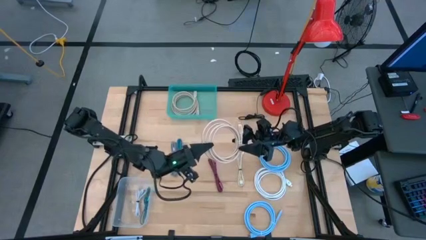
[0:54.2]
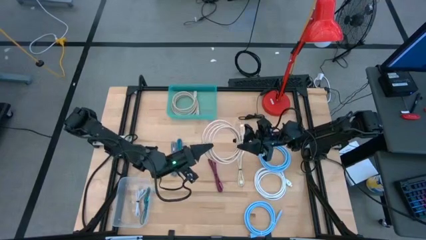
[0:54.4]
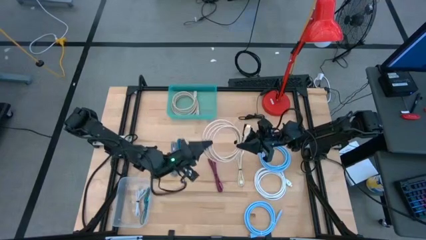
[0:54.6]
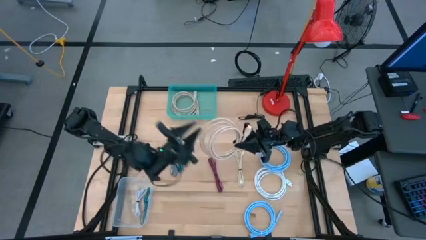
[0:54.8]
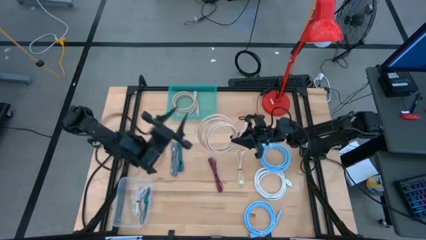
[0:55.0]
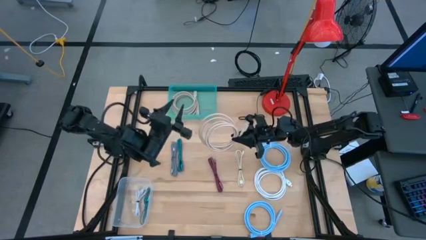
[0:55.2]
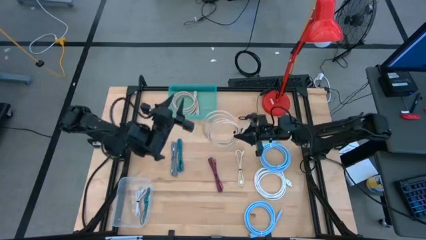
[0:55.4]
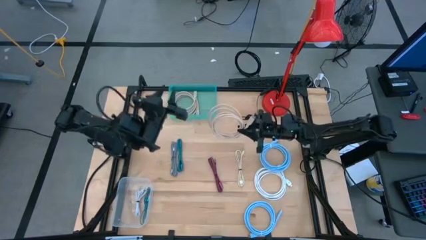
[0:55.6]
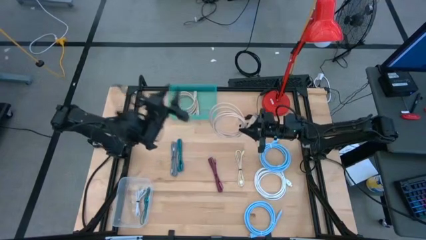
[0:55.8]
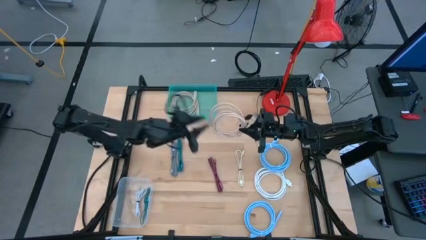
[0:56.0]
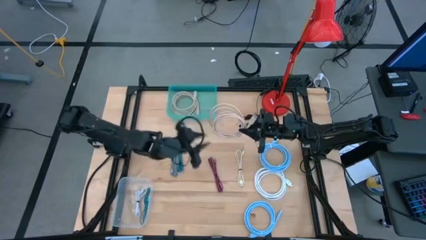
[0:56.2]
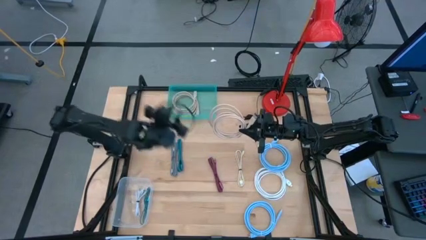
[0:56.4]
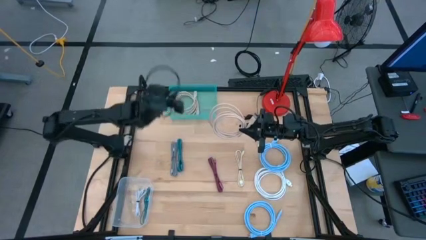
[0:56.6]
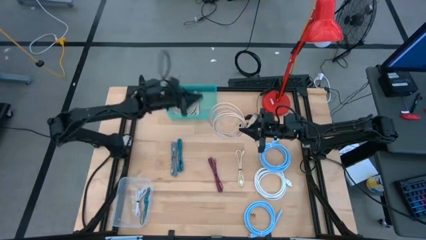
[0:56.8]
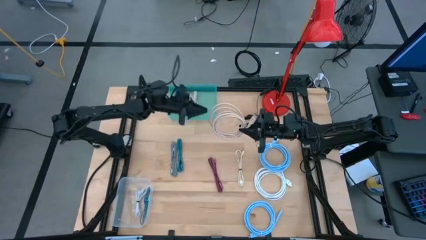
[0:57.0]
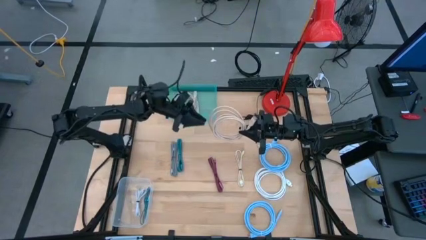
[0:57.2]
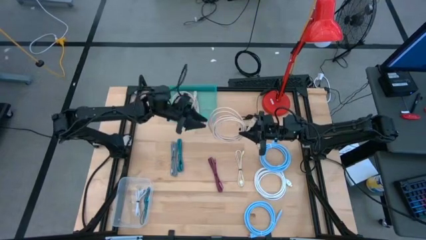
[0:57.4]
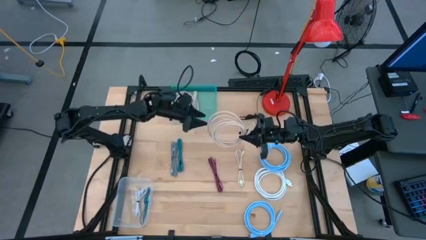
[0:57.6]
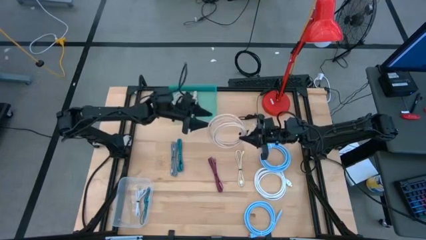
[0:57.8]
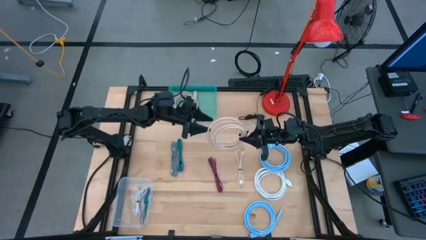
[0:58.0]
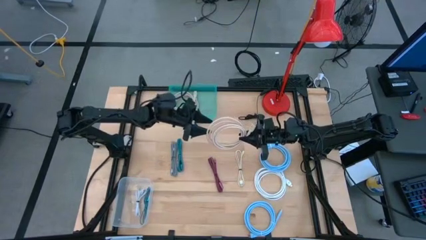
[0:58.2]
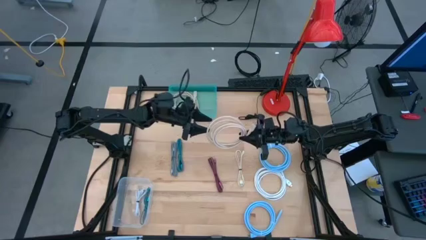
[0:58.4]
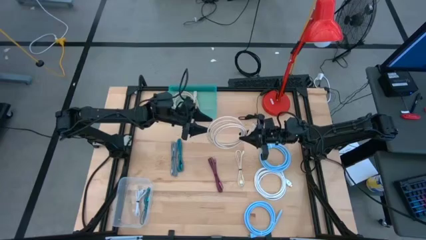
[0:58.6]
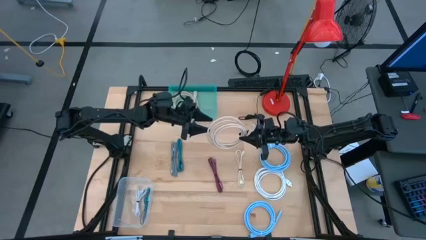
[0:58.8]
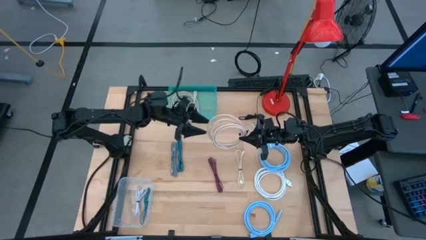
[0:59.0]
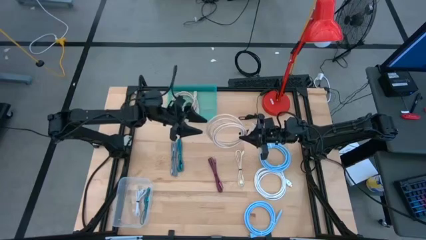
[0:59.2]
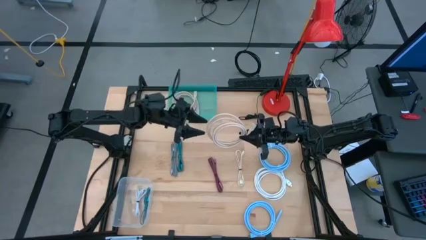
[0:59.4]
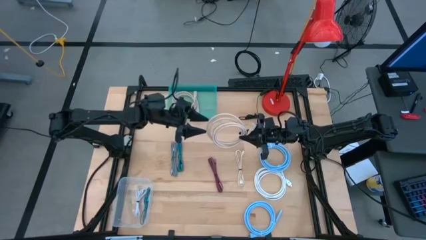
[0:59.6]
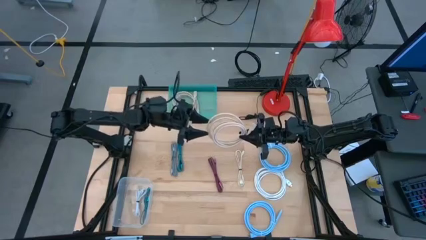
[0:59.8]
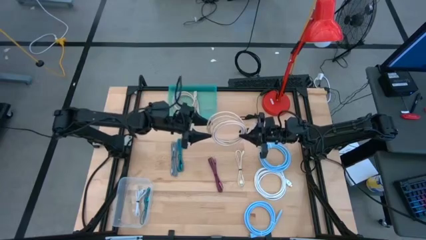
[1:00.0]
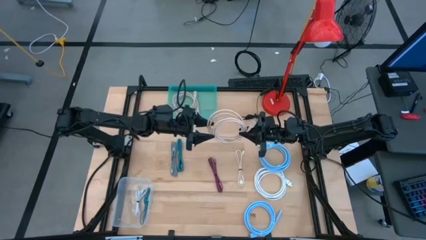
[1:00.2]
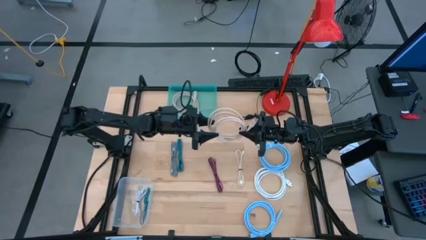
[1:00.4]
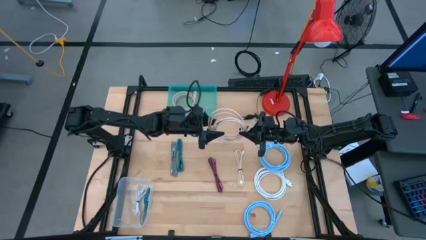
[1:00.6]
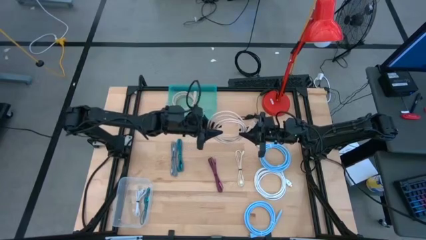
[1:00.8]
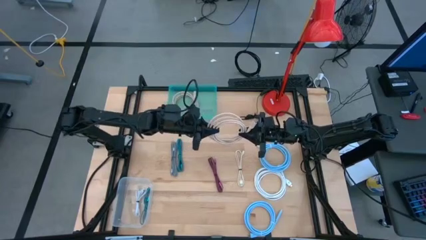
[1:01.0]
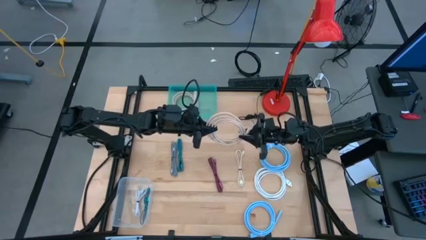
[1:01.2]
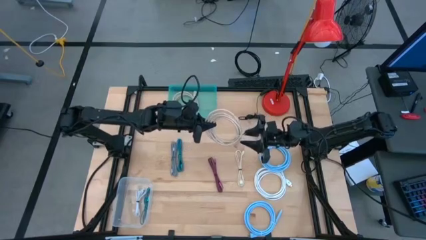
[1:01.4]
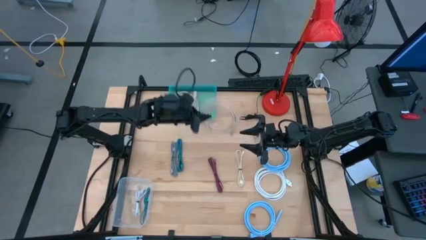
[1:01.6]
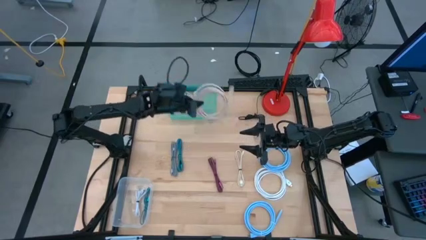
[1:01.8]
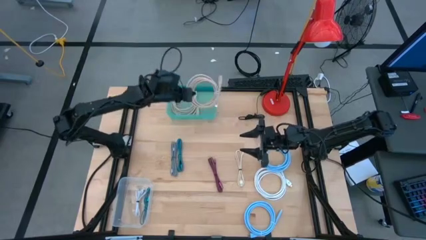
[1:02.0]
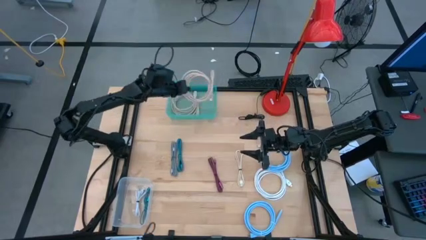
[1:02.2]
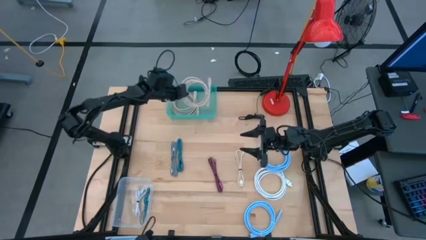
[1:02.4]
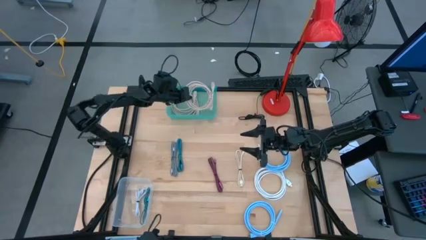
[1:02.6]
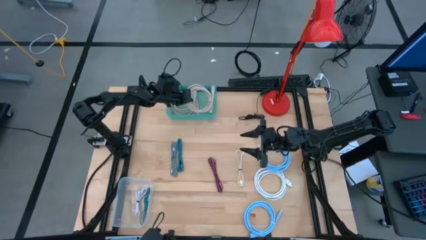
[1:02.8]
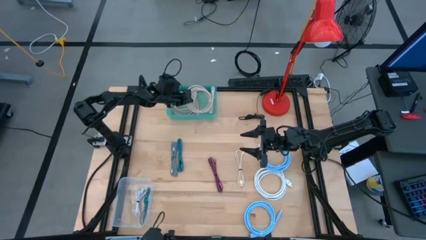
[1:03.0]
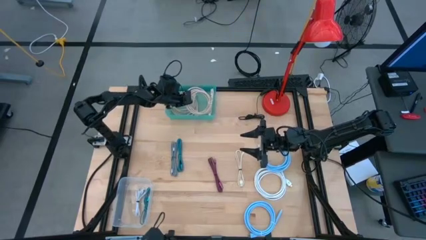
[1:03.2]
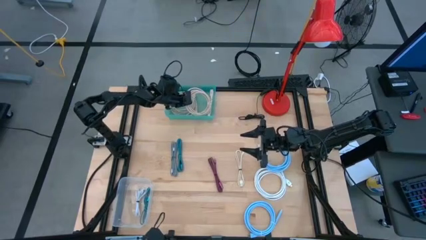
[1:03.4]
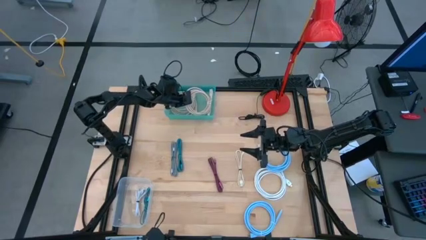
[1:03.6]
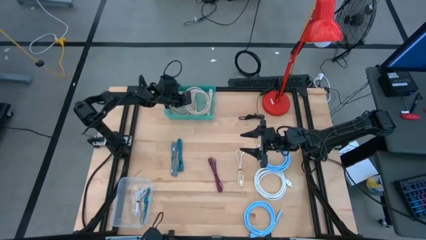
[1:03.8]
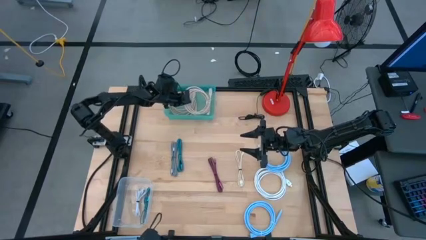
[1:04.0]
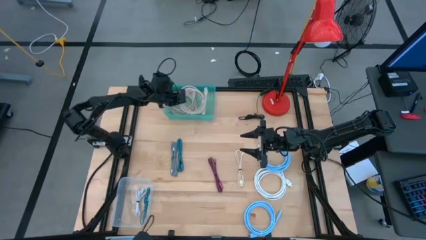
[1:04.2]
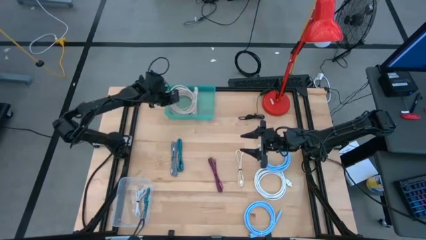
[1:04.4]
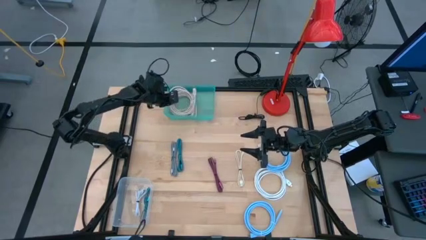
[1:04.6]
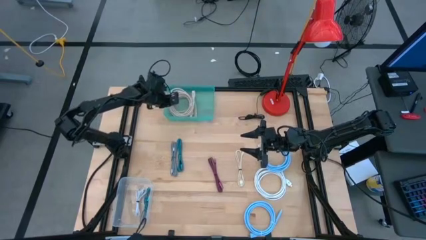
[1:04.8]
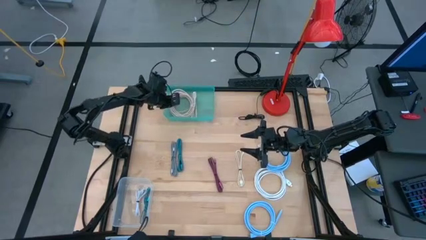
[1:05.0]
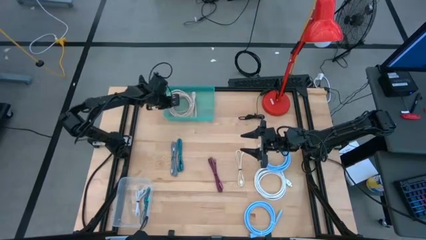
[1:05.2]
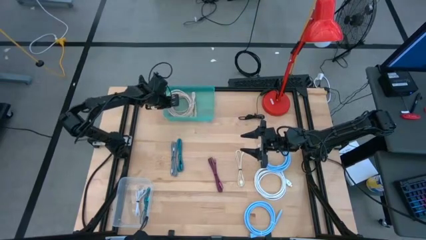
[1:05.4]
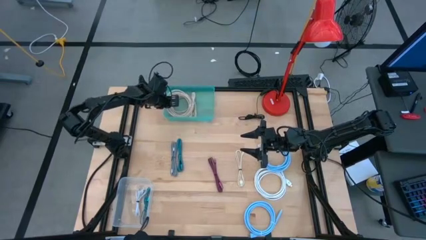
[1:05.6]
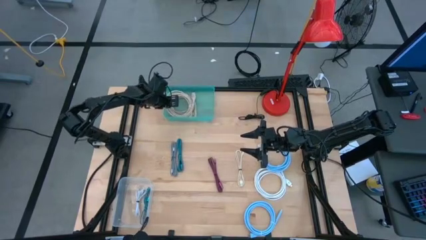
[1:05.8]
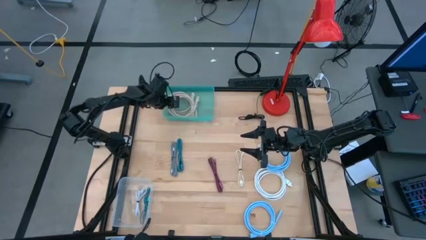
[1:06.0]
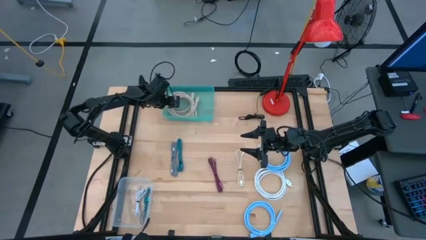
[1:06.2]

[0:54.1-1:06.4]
Task: Pick & Place USB Port
Put the brown HDMI cable into the green bin

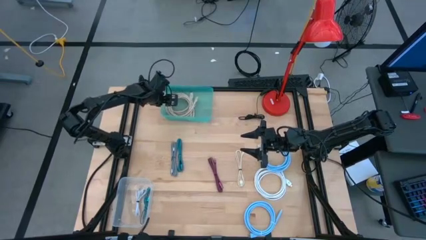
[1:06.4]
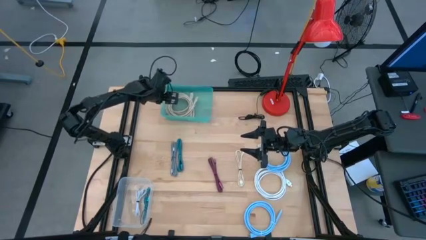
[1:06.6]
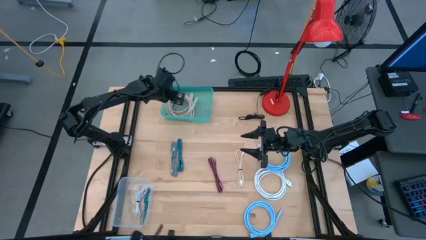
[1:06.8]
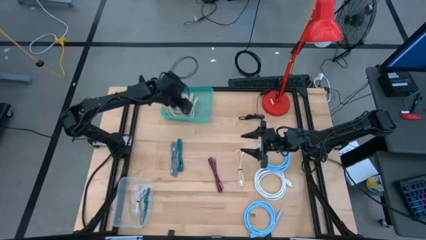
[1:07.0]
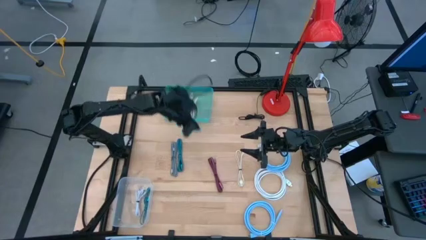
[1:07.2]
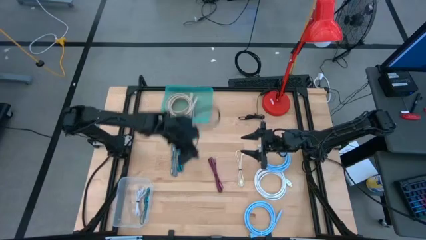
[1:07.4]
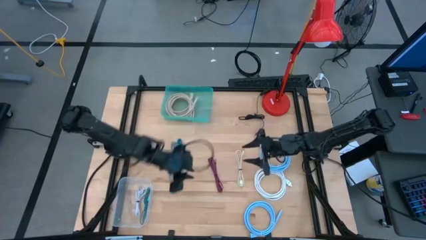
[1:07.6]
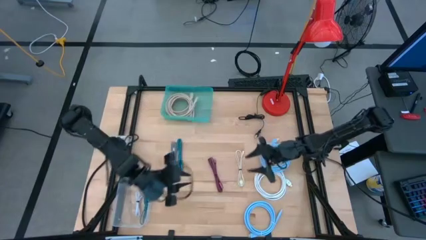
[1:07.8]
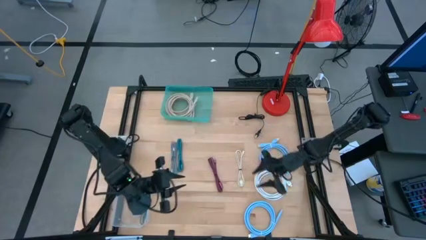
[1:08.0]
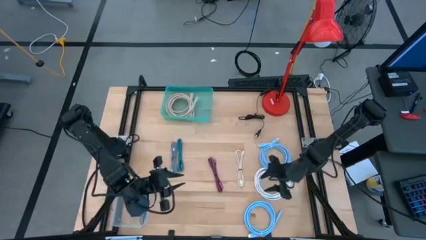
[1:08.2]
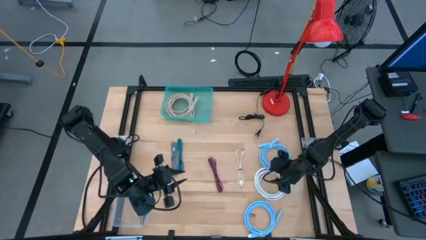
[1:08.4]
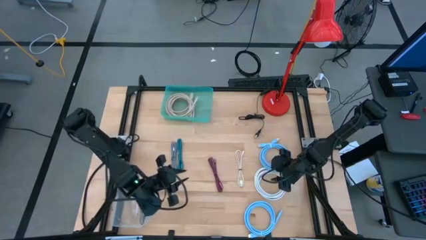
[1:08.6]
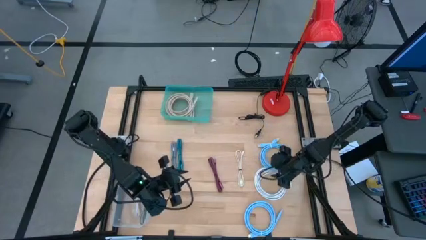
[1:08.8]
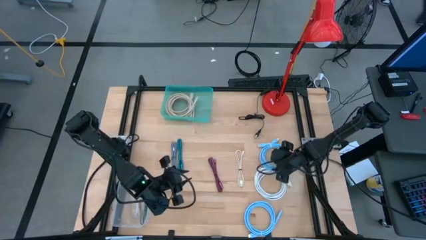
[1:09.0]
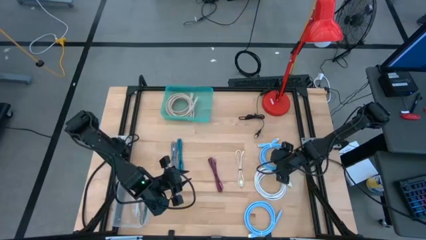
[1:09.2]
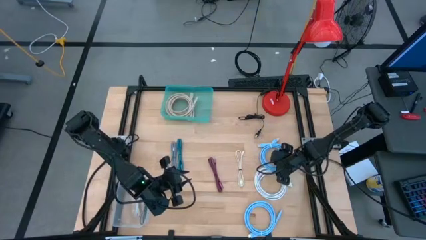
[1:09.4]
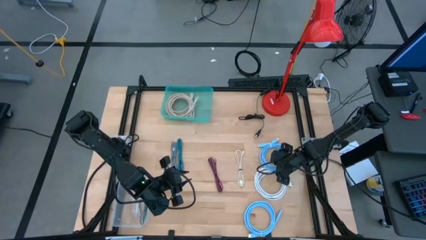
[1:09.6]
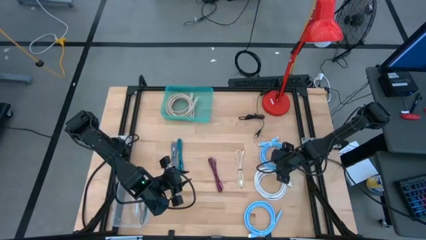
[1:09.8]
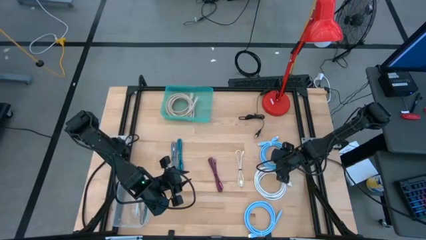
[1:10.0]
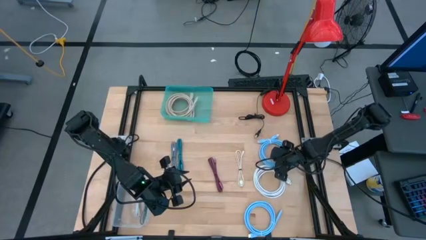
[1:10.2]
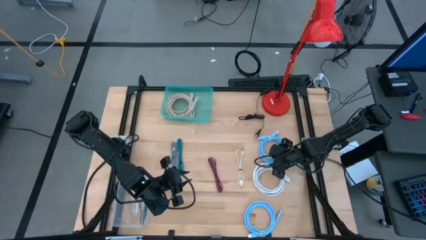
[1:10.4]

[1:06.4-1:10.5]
Adjust the top blue HDMI cable
